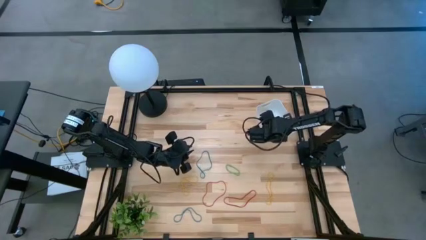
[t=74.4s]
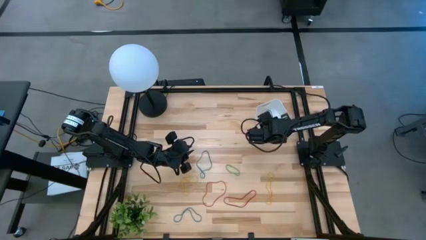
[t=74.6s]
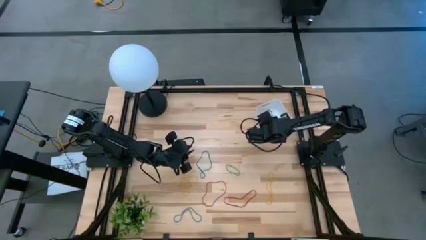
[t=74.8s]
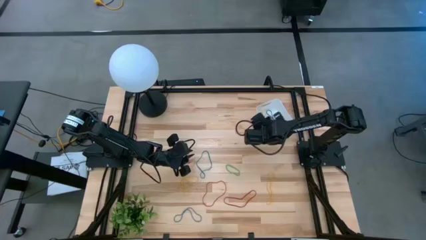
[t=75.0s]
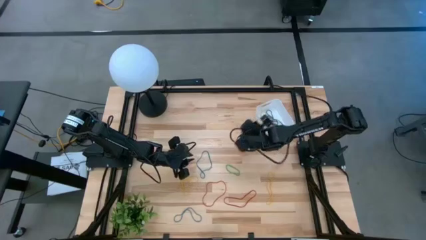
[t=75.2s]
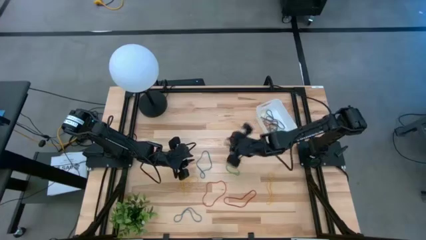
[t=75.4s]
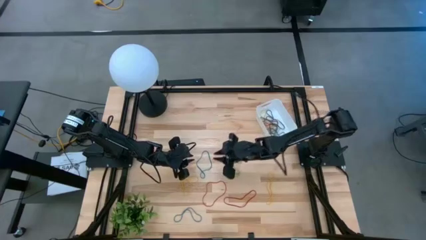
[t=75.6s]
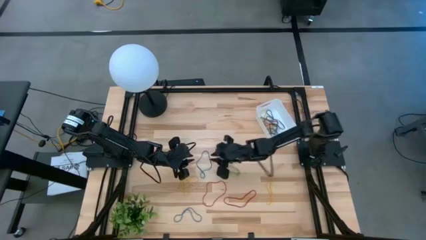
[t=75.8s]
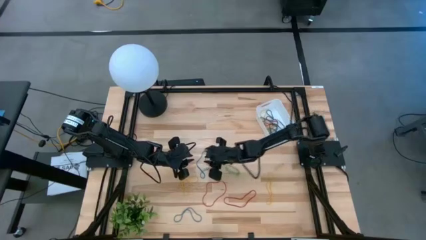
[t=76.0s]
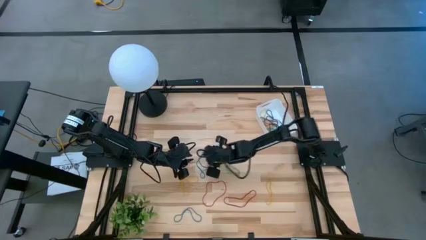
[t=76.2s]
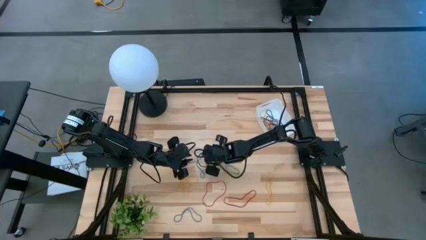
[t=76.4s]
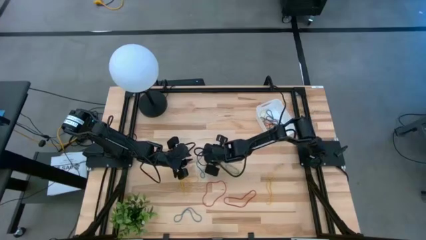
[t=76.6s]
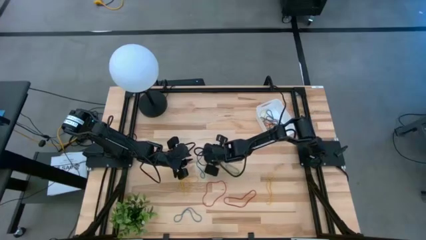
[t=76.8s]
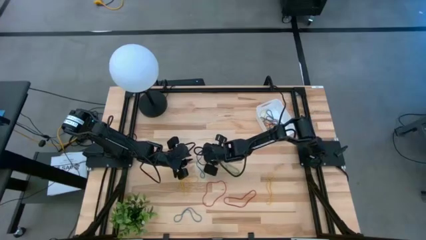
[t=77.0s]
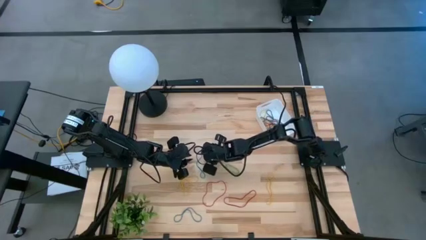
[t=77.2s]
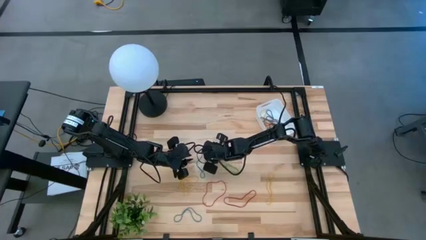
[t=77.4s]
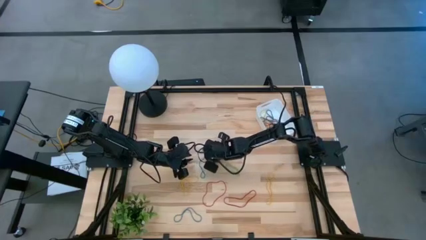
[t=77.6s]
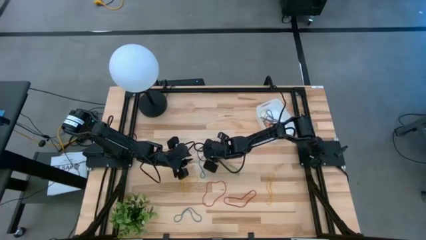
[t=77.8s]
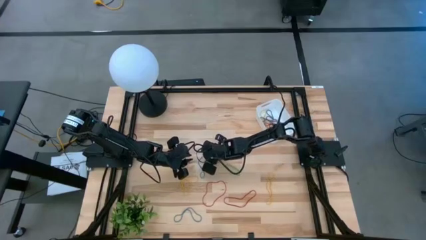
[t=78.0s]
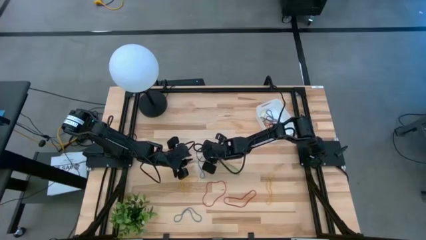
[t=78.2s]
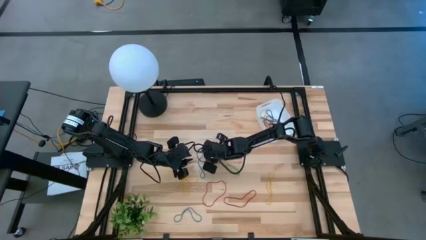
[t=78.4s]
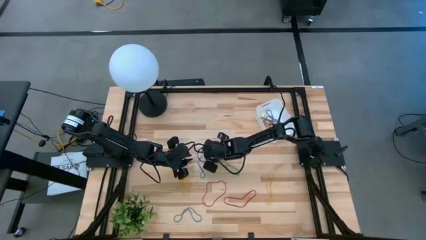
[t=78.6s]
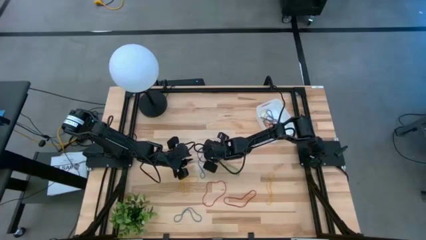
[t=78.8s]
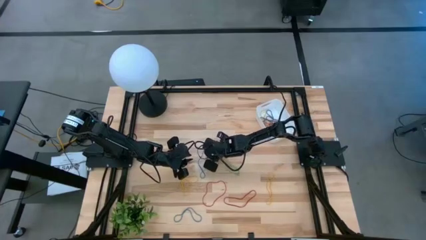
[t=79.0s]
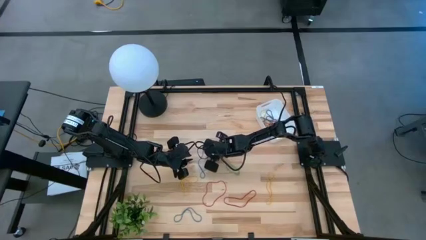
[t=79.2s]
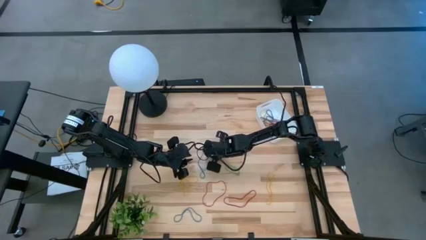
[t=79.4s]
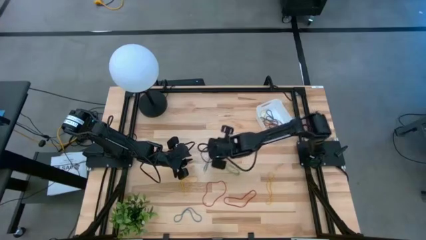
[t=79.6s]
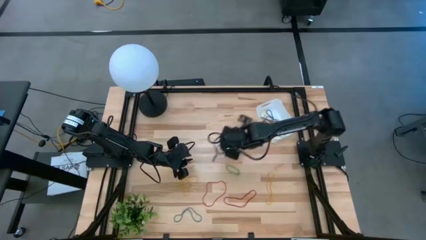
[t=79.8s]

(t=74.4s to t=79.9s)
Task: Pick and place items into bin
Put the top blue rubber band into the white bin

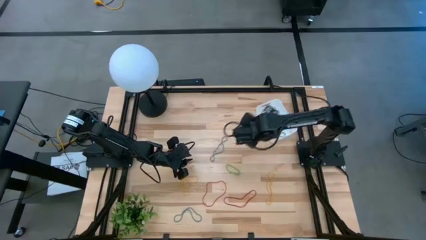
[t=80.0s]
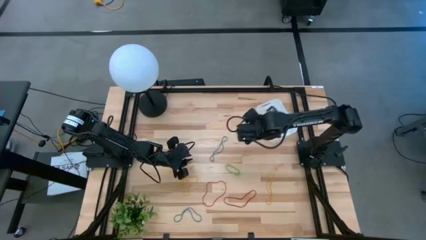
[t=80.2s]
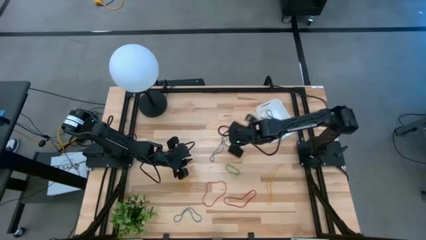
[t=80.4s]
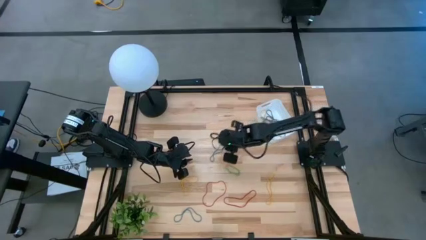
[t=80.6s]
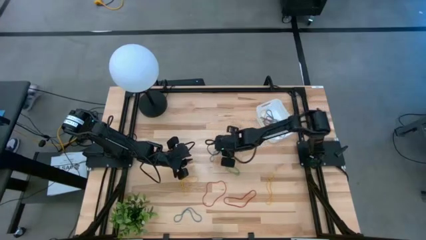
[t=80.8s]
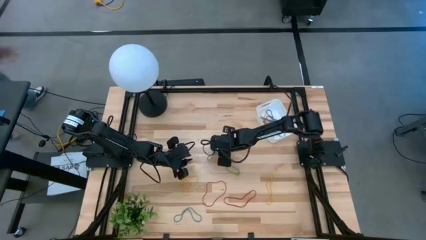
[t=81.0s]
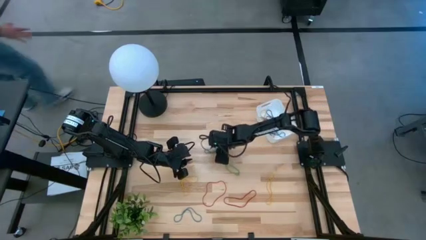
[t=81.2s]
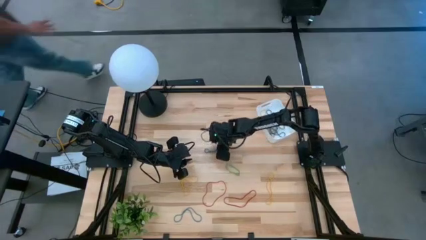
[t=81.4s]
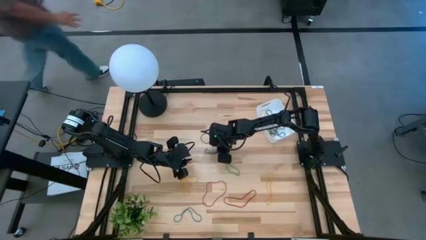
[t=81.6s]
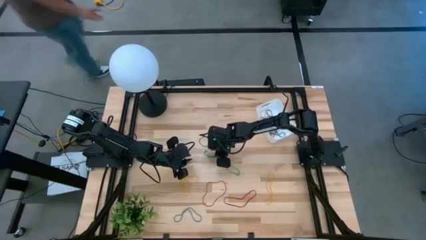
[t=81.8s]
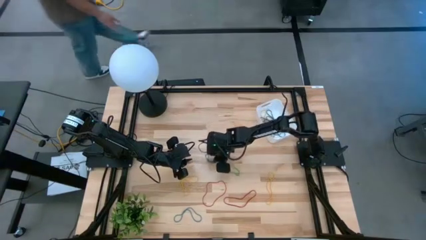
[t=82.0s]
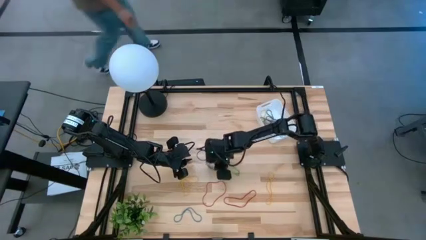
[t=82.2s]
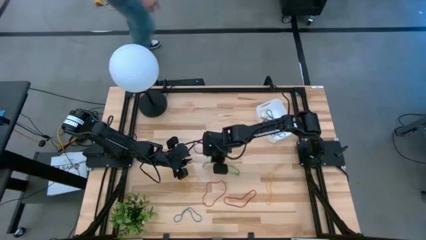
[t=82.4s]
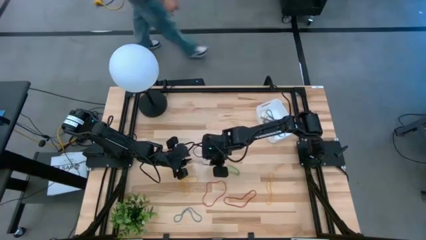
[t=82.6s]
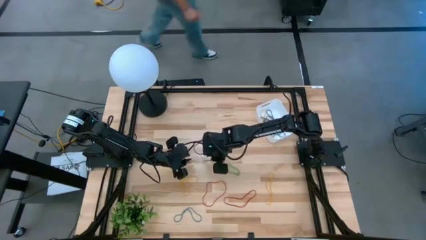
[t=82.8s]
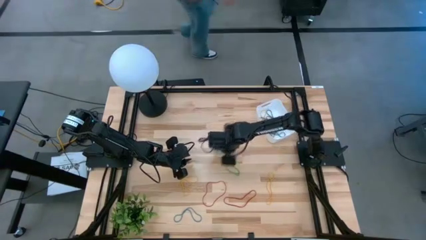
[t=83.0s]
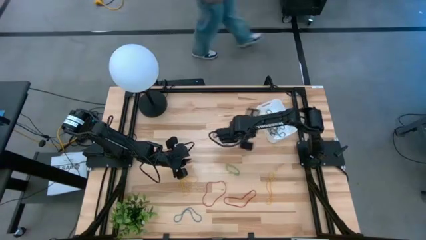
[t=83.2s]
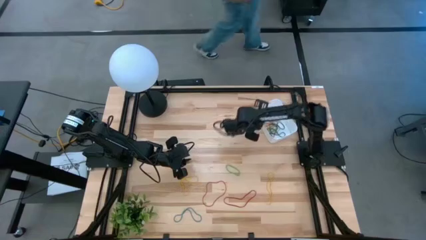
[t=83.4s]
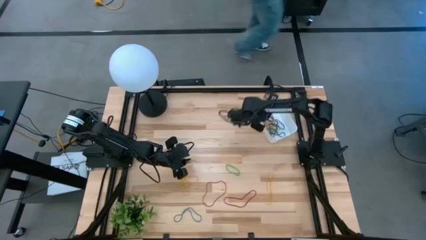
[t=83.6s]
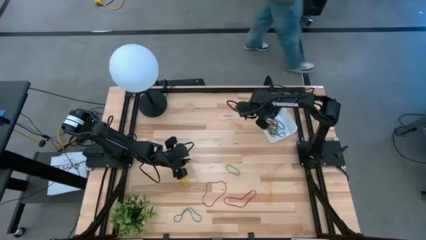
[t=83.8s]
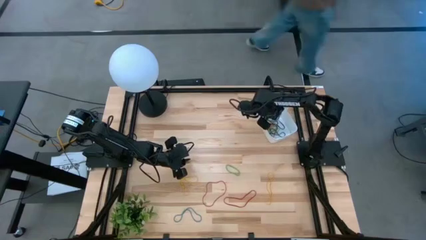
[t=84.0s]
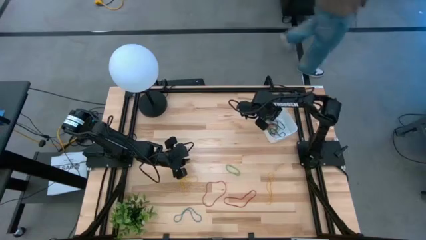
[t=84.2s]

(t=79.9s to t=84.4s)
Put the top blue rubber band into the white bin

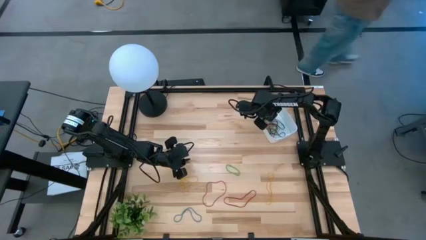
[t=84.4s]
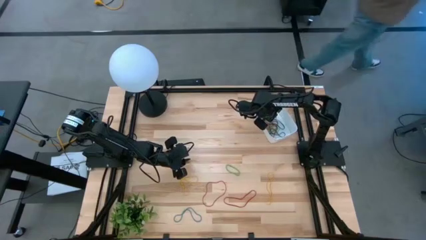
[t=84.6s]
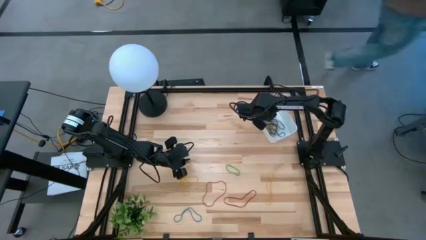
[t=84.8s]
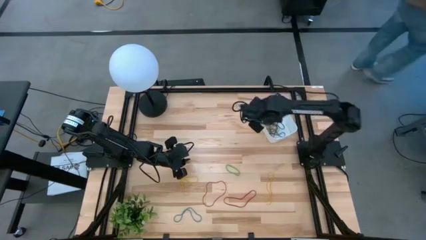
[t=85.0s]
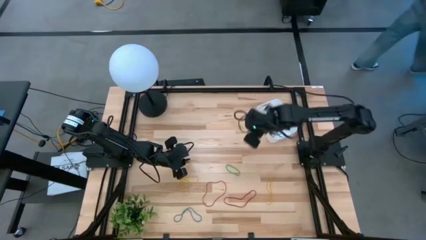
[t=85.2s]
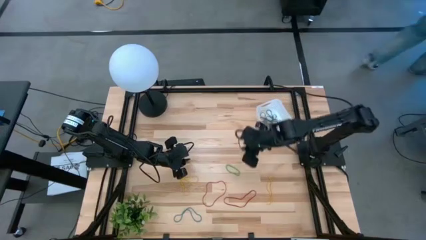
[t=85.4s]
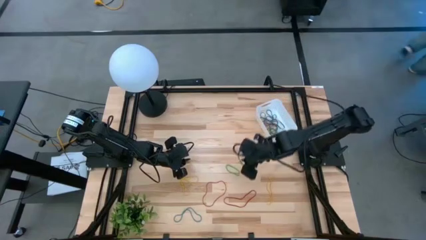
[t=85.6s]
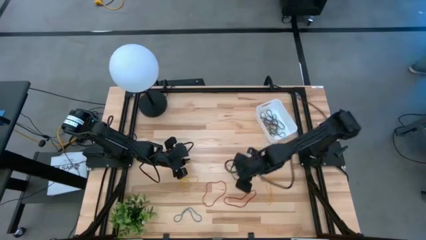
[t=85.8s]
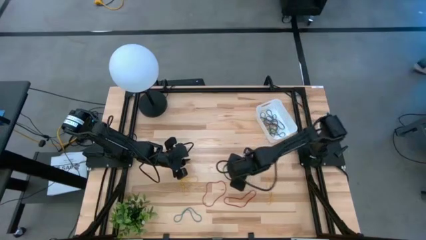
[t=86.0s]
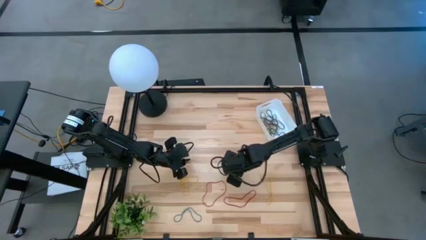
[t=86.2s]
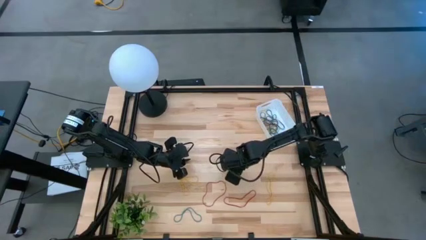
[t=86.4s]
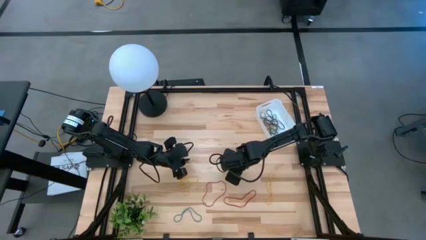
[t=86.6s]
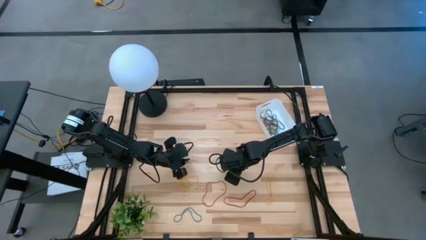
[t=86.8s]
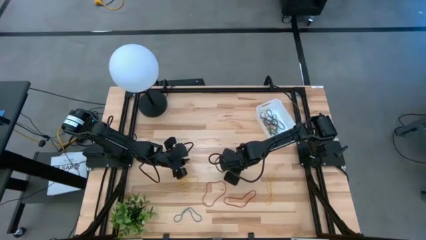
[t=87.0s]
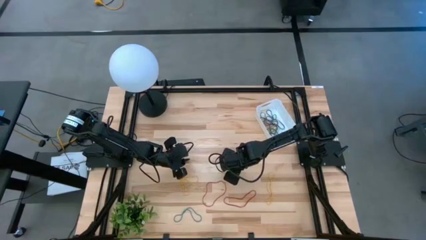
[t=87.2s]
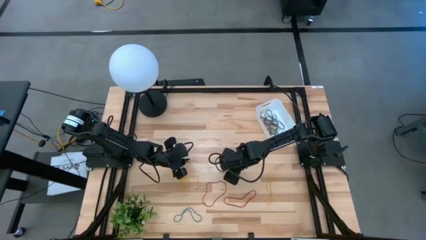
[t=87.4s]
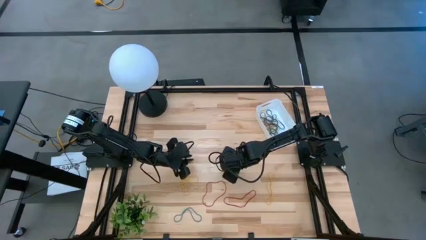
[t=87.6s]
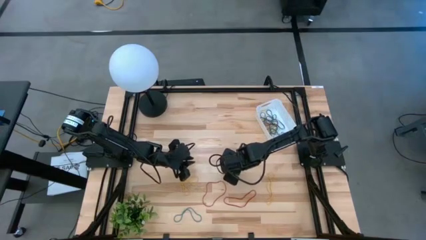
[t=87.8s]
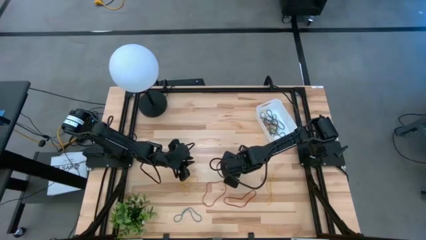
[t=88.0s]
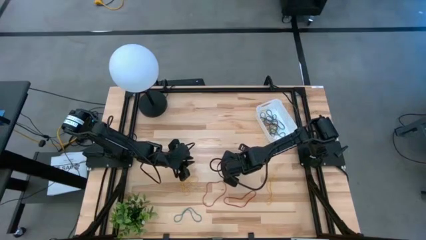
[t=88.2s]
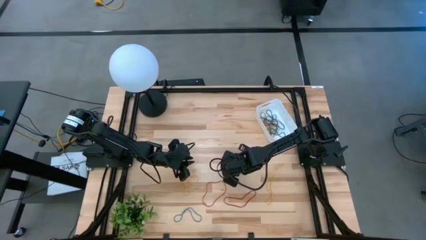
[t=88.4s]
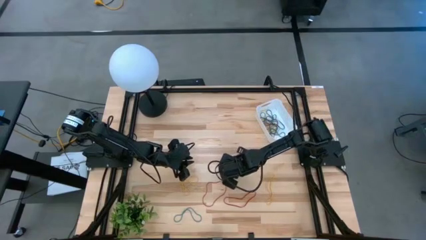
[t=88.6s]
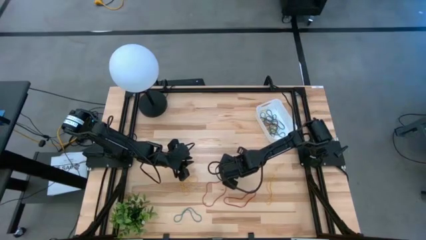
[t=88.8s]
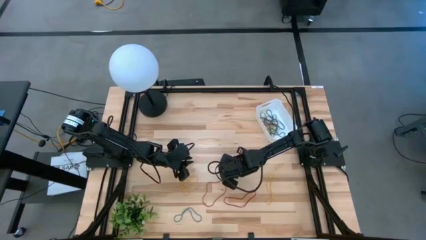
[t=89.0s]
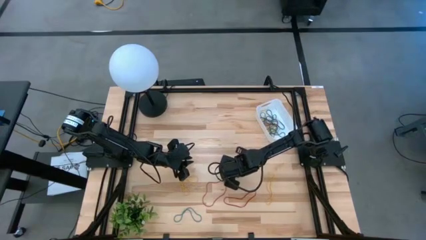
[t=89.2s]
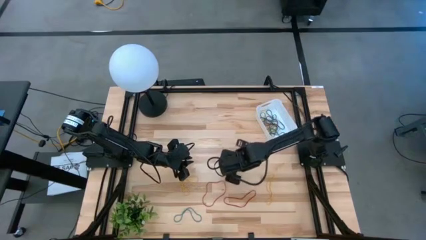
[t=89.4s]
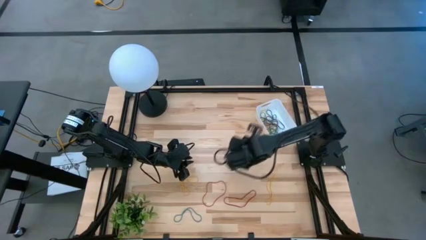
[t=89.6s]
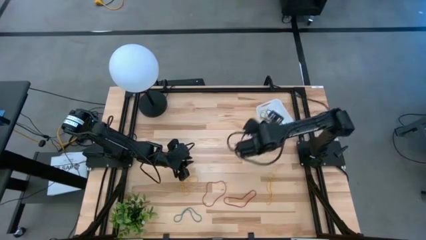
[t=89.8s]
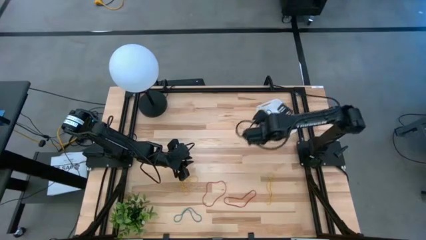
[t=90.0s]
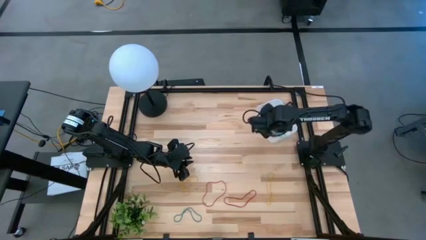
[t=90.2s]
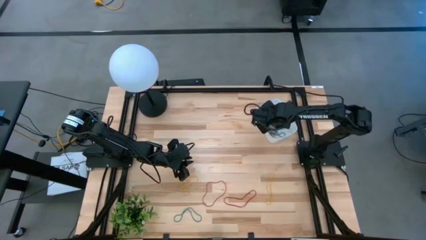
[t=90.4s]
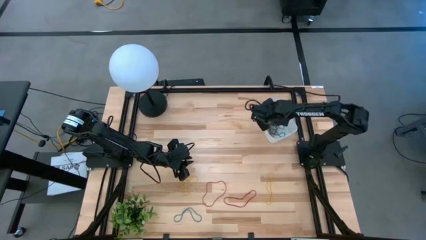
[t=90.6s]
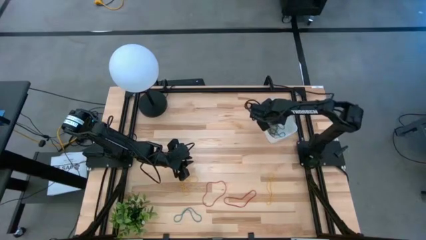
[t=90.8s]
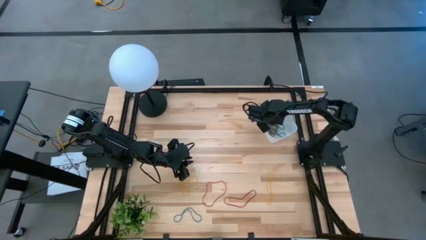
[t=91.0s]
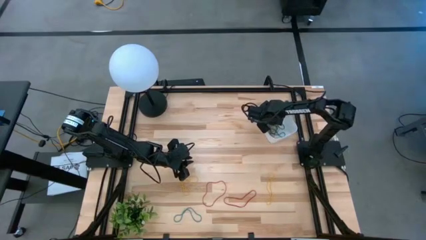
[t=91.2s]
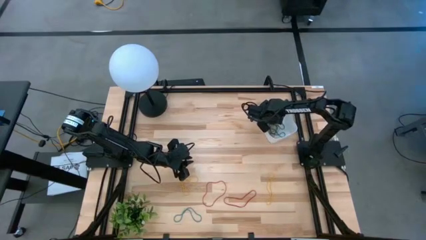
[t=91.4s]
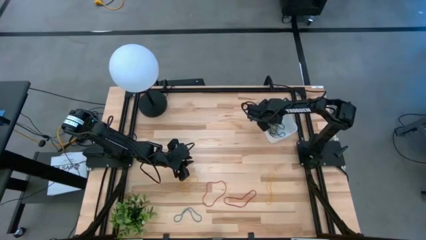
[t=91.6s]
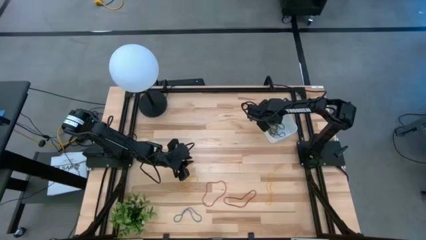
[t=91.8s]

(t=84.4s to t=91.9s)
Put the green rubber band into the white bin
